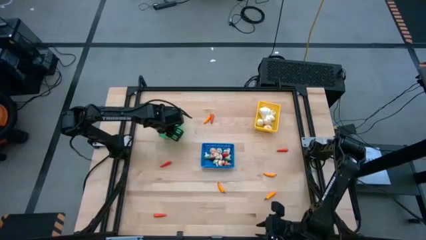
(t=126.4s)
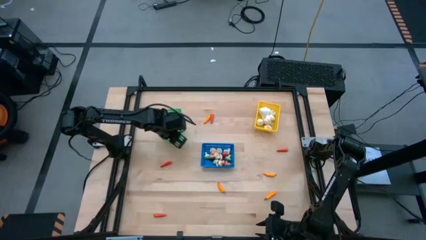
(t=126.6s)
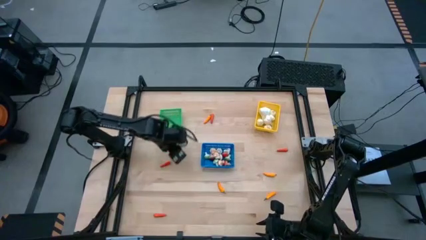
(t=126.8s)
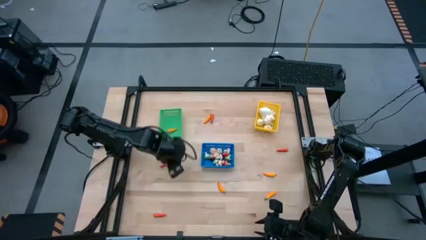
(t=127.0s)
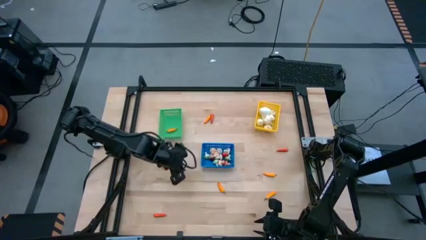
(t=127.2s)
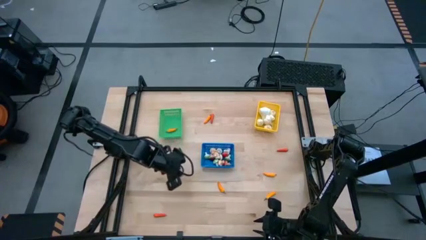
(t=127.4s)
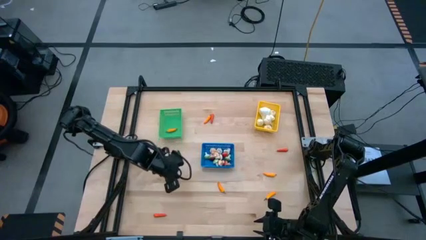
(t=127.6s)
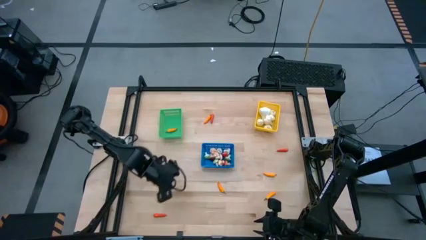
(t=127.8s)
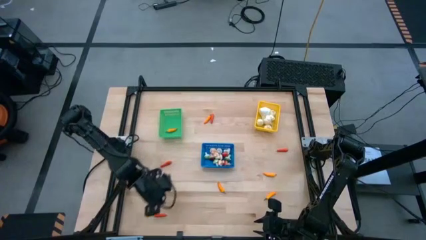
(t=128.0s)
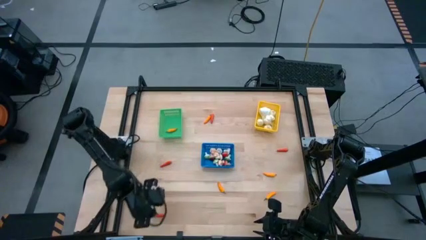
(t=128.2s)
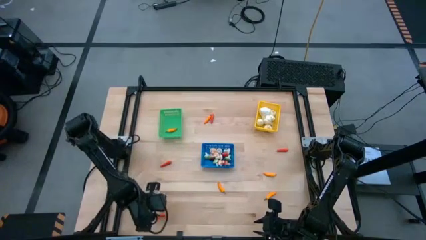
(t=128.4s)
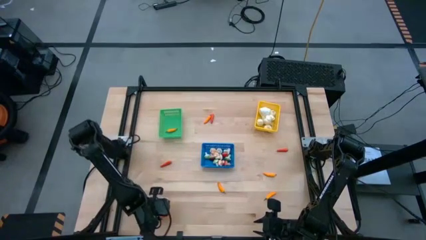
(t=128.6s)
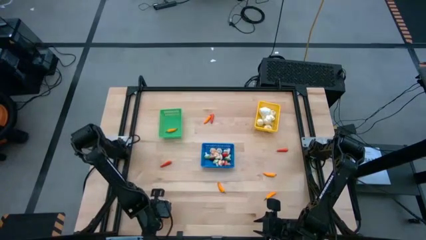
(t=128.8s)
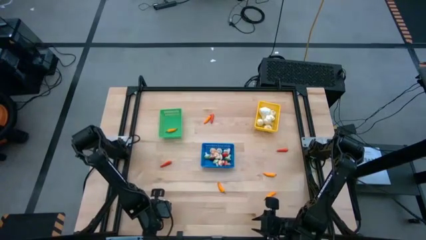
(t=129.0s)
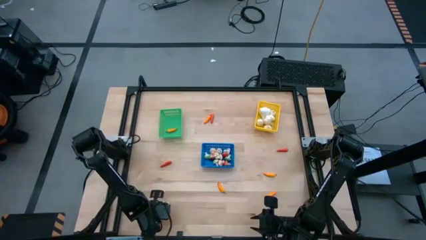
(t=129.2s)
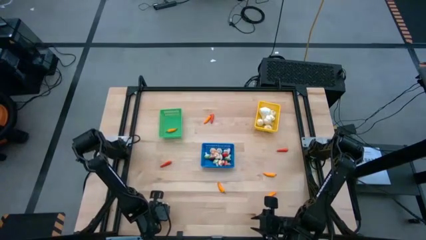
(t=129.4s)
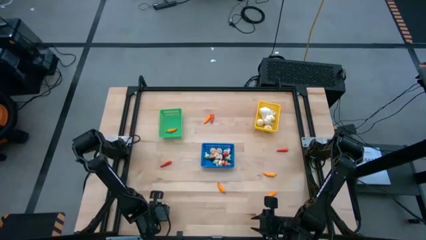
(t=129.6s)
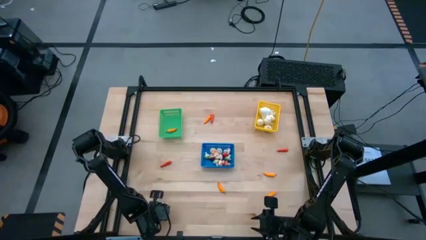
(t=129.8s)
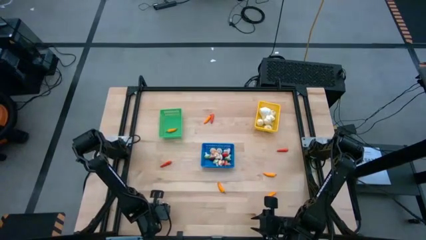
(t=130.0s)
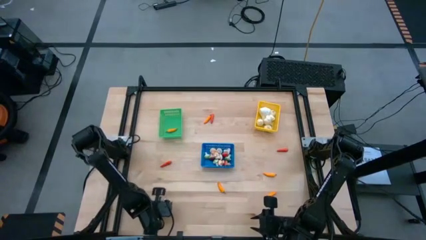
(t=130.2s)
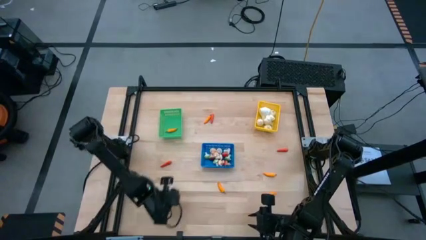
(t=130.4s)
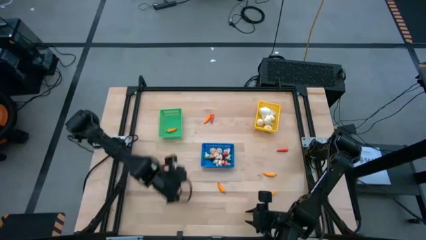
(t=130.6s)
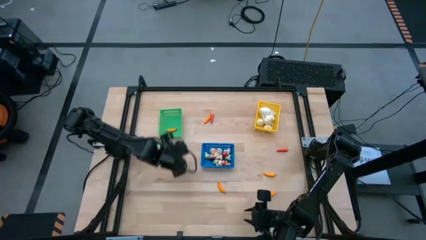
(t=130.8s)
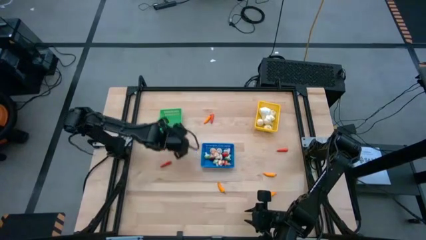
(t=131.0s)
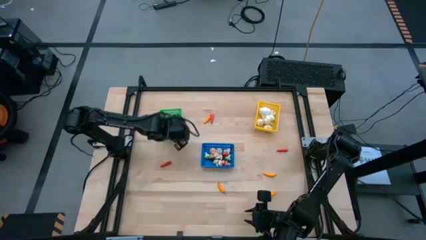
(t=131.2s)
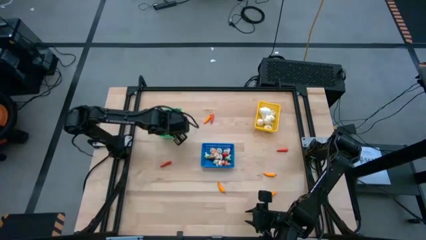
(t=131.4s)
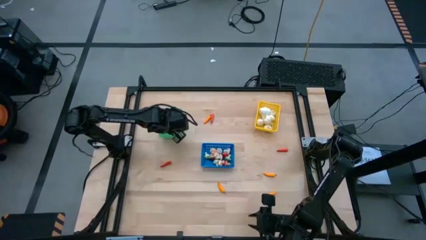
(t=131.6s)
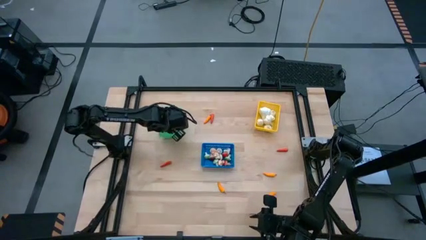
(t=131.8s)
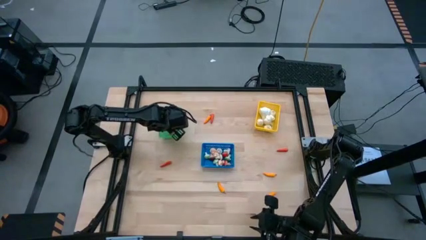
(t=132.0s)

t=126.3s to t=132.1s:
Task: Sort produce into baskets
Put the orange chili pepper into the green bin

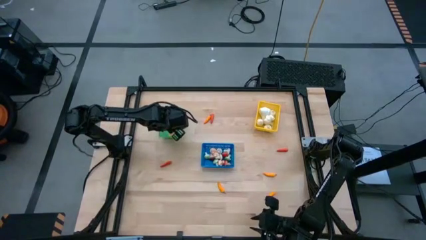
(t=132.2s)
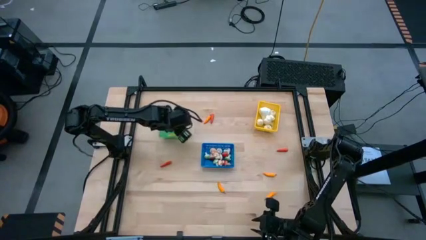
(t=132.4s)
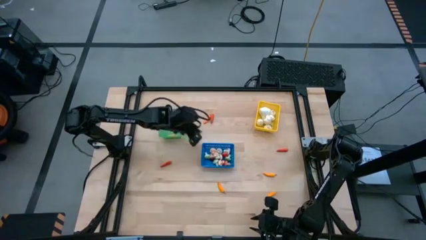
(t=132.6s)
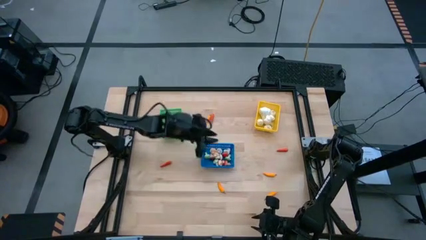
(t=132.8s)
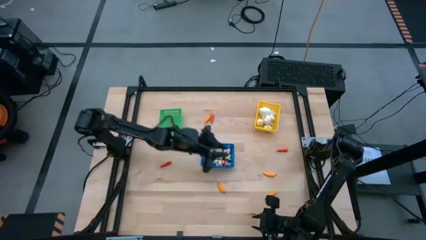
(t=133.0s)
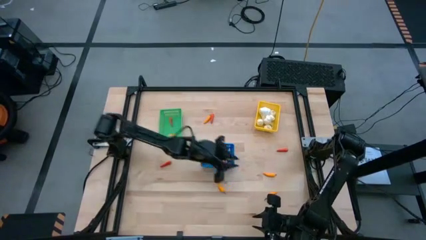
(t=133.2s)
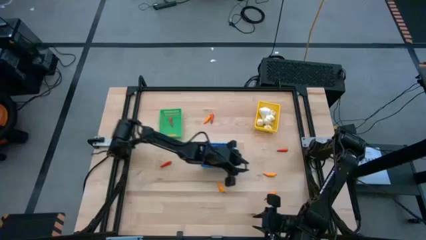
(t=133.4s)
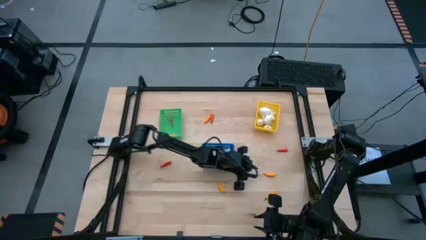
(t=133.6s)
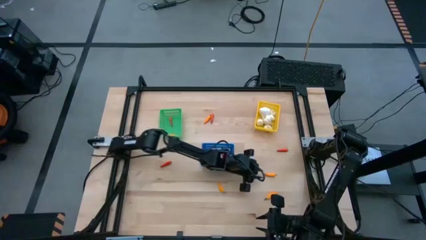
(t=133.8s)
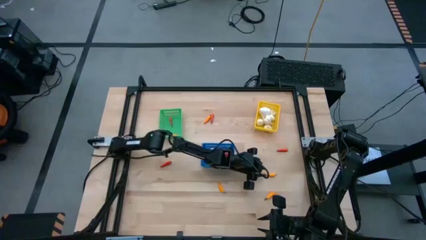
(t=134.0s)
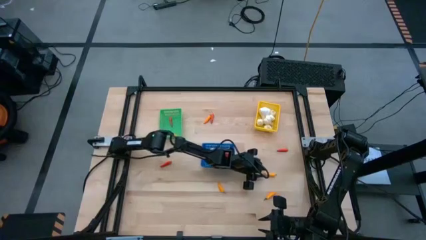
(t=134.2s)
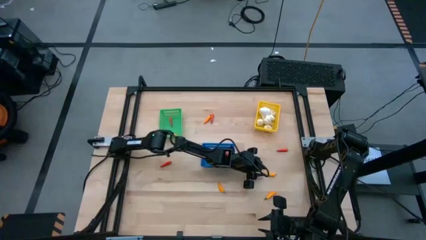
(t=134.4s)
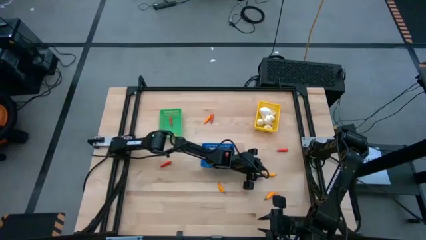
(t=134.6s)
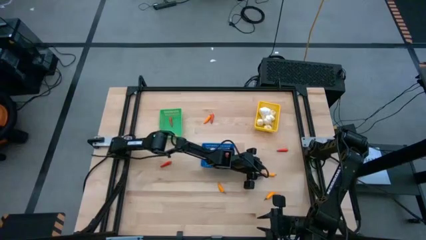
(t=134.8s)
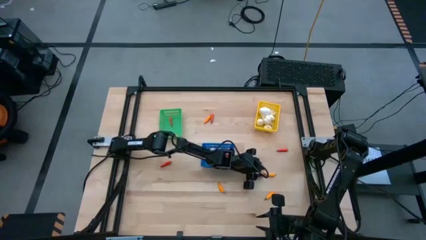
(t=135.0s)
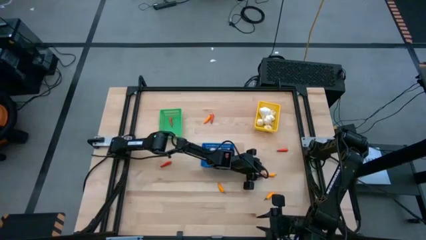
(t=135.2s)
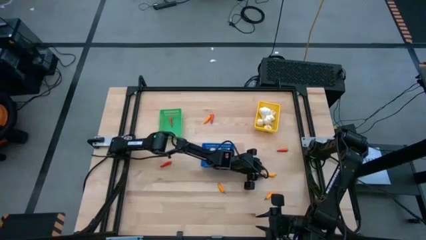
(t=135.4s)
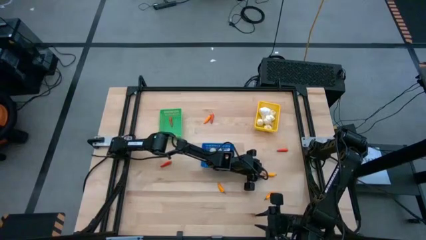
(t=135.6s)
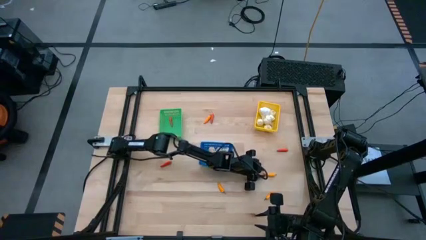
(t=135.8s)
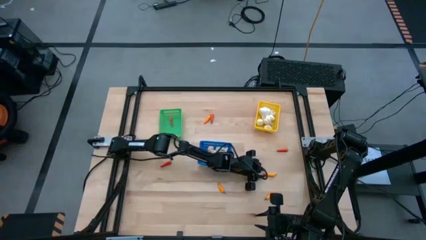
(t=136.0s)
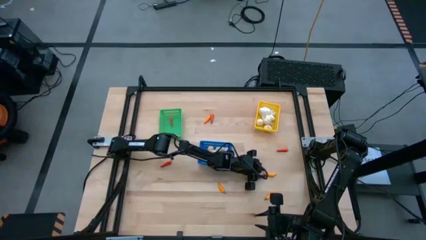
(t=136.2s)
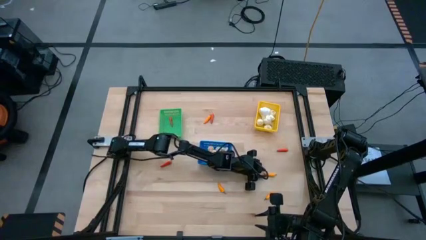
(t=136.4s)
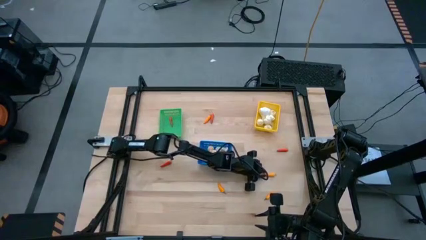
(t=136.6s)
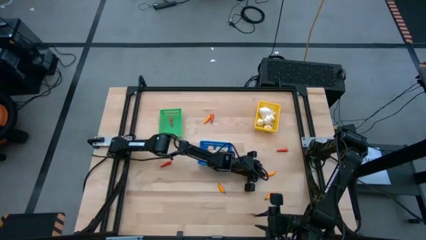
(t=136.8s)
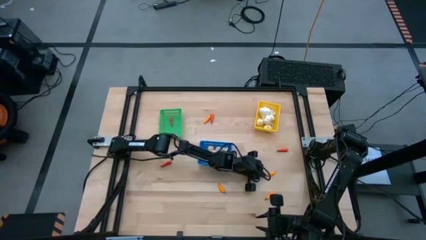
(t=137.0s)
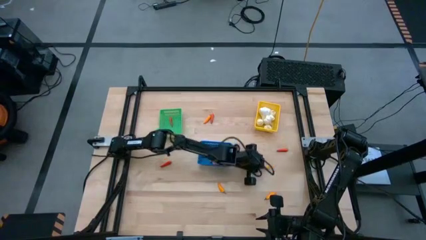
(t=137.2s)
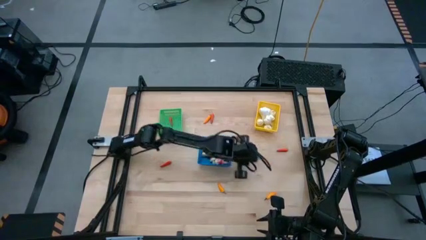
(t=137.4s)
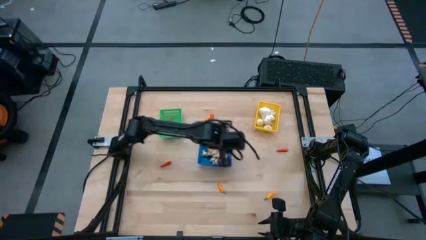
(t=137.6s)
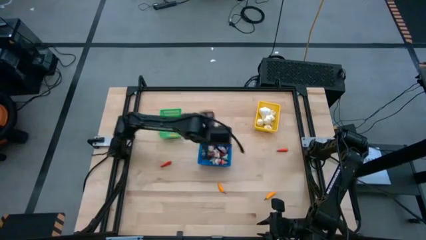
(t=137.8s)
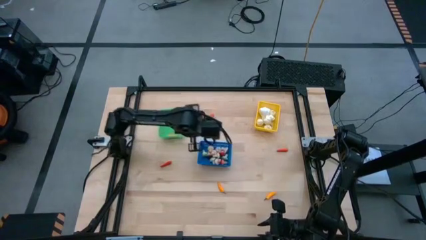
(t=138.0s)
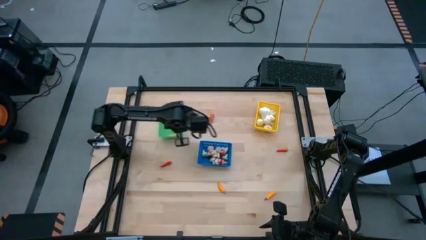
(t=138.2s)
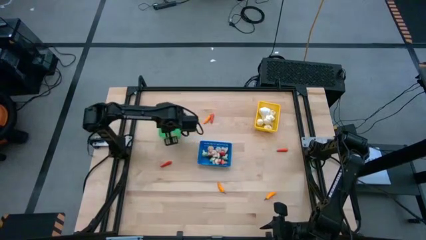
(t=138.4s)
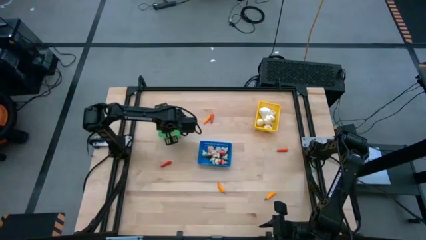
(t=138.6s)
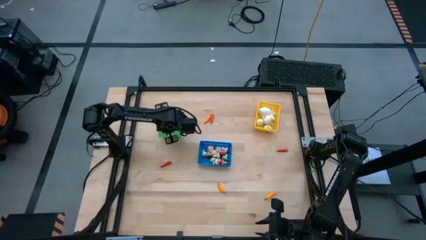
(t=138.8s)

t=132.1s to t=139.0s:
Put the yellow chili into the green bin

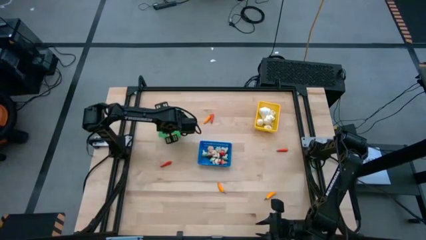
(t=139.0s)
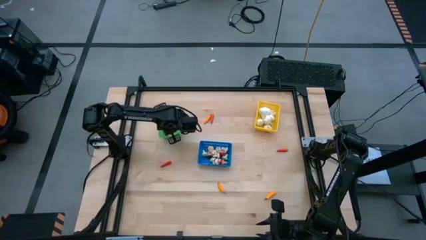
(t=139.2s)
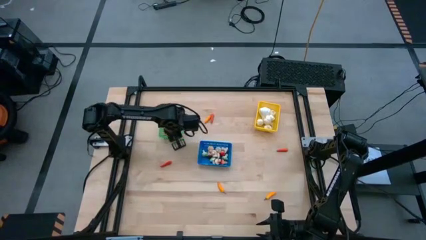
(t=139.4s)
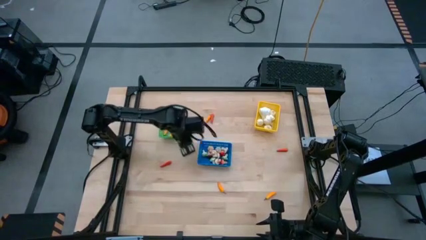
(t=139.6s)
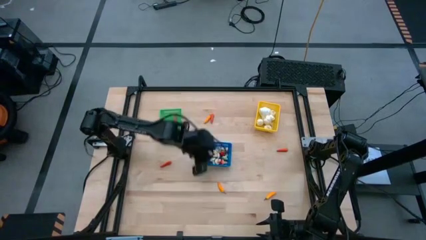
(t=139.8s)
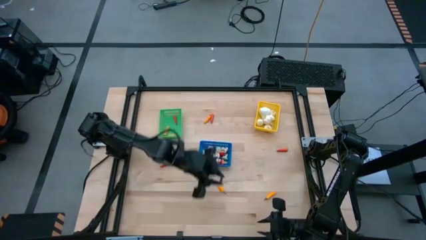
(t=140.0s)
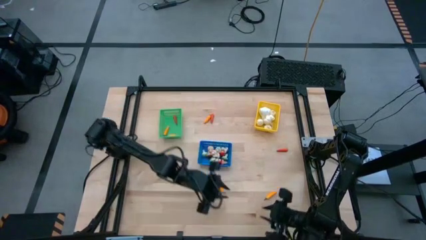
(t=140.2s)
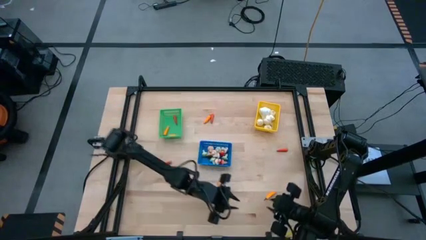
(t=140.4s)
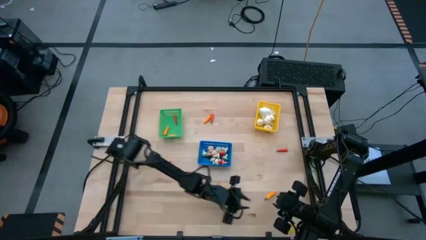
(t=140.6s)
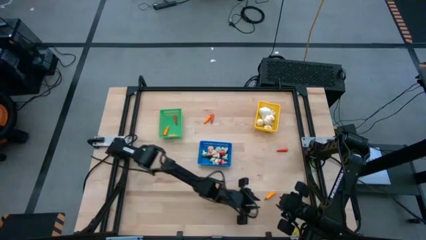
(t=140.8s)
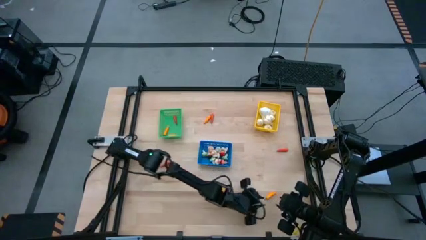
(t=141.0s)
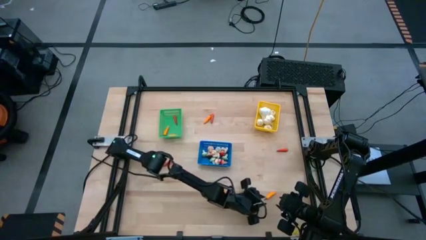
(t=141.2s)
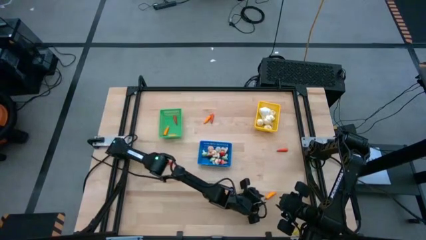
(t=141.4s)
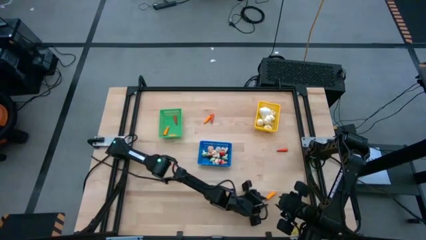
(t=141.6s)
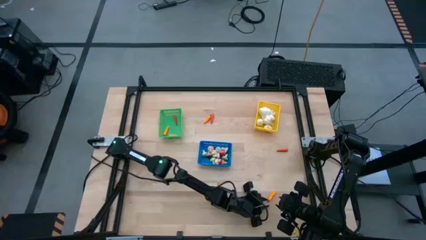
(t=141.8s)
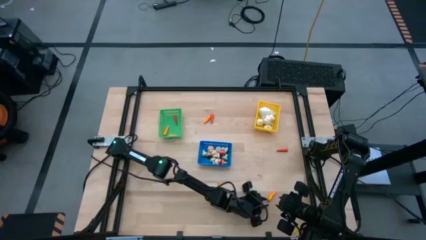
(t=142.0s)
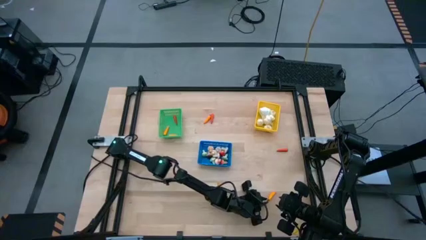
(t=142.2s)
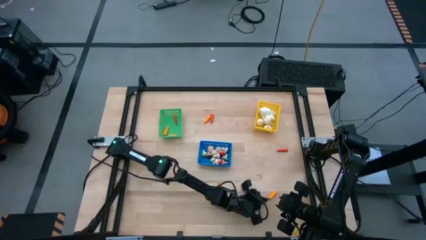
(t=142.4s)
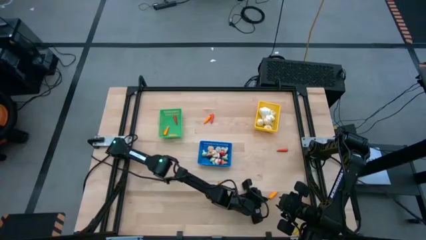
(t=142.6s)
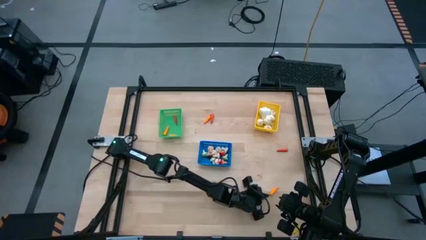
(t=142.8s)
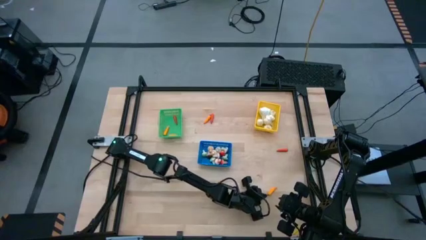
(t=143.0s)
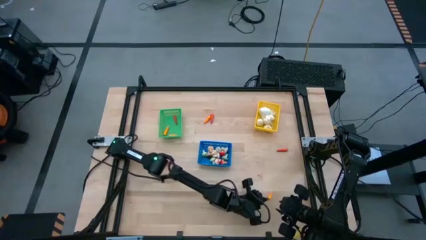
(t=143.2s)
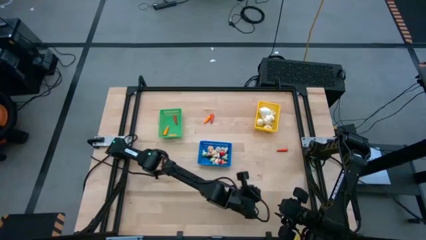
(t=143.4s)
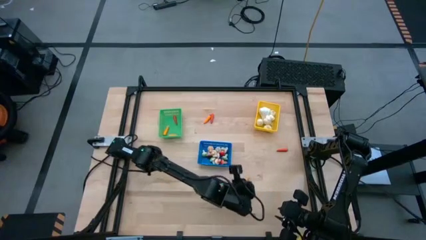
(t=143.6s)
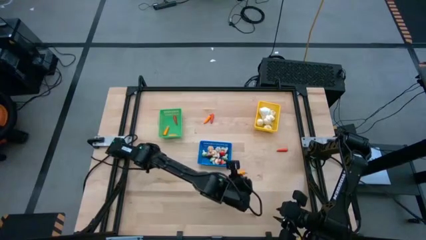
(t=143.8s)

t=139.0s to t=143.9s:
Put the yellow chili pepper into the green bin
